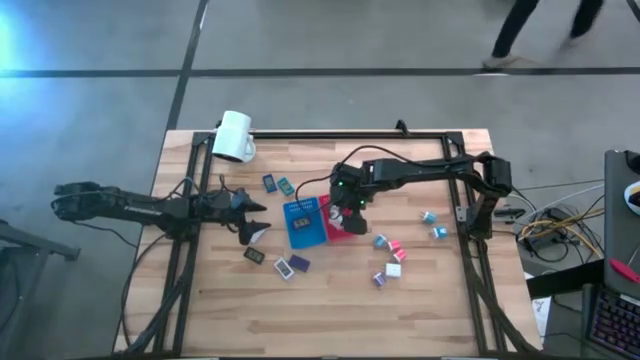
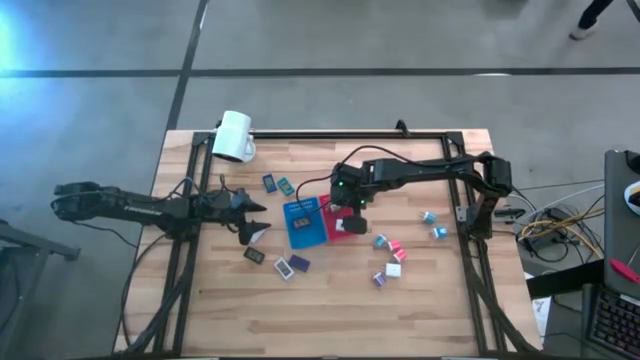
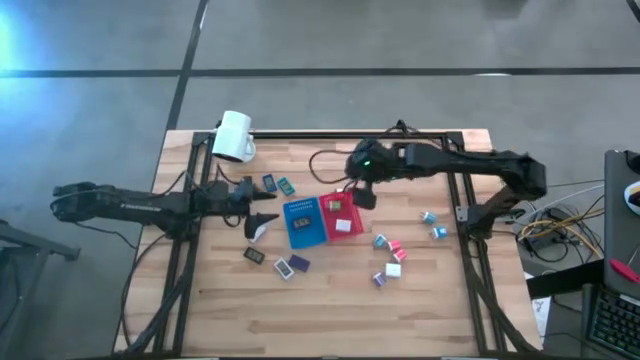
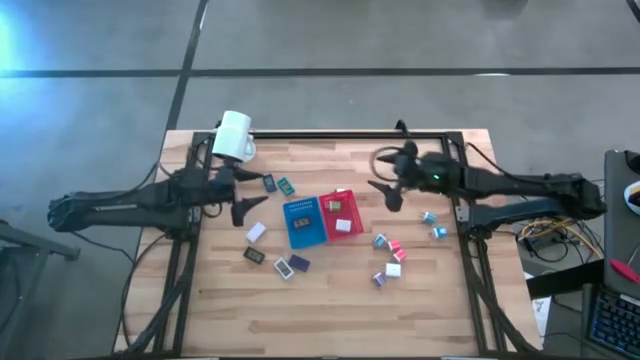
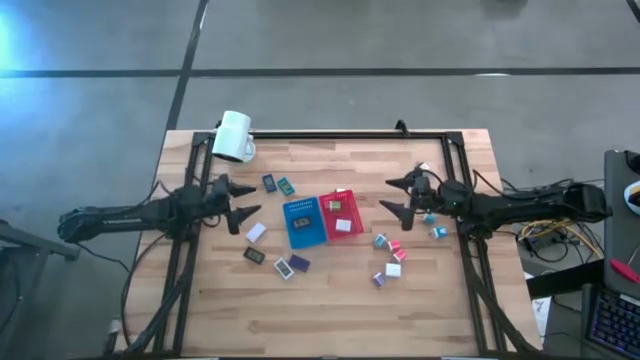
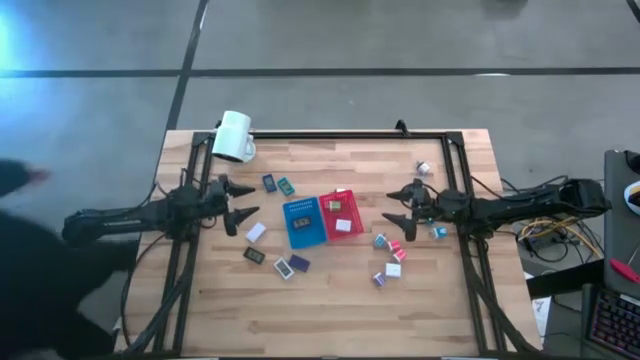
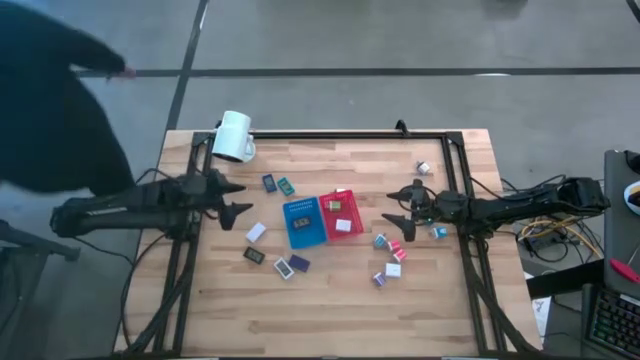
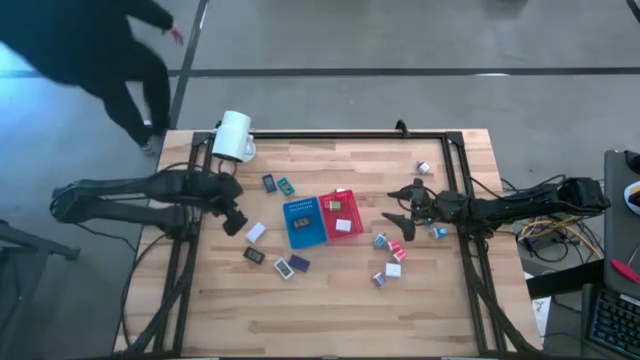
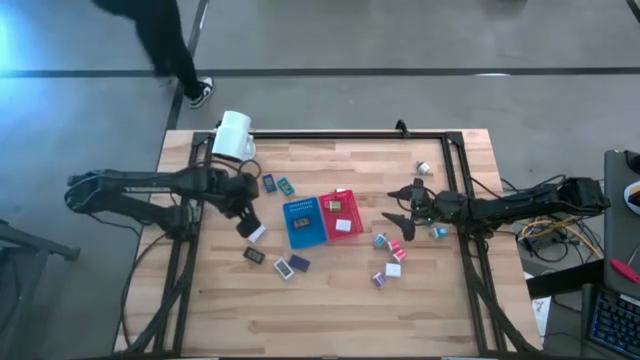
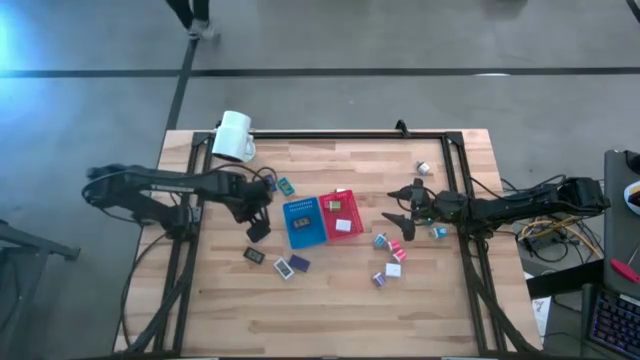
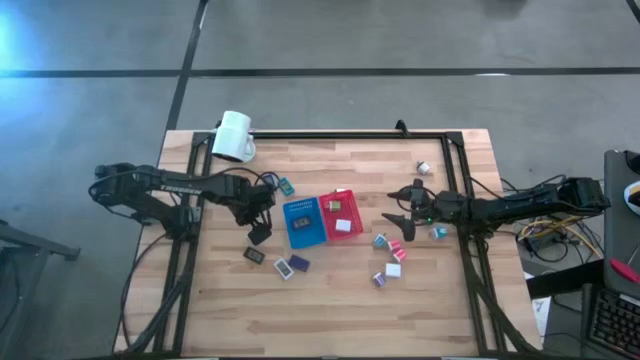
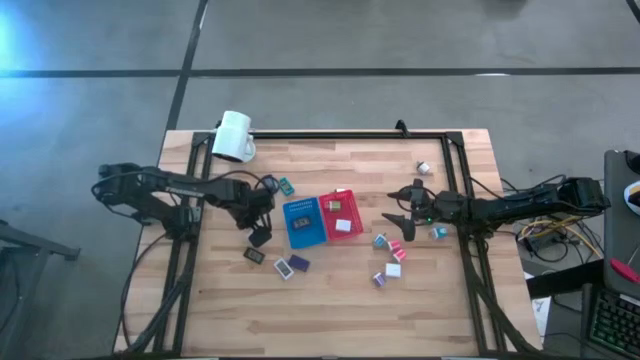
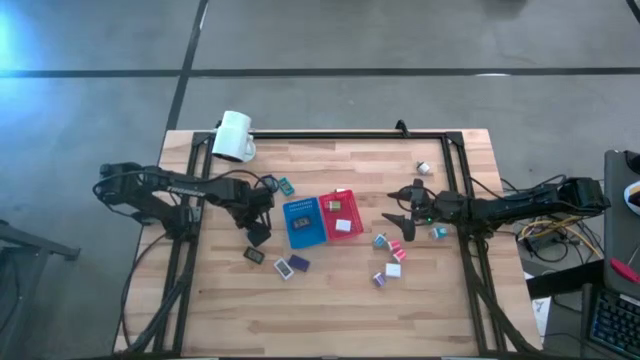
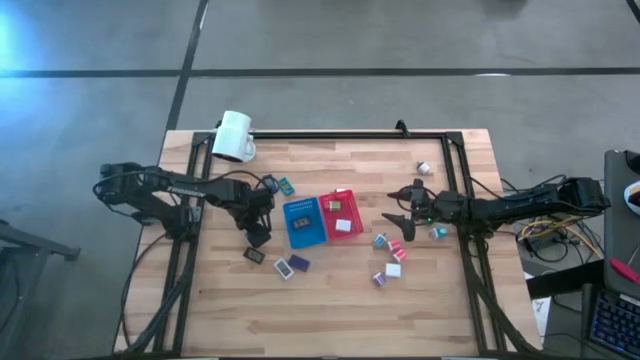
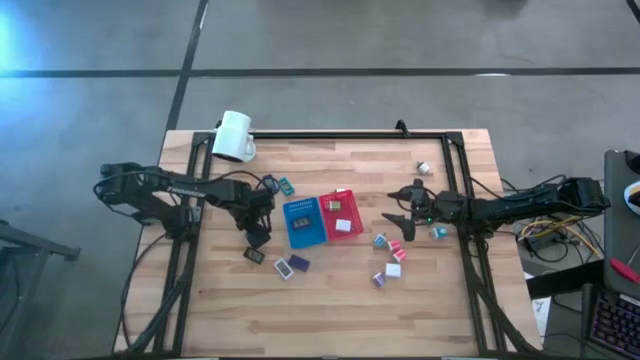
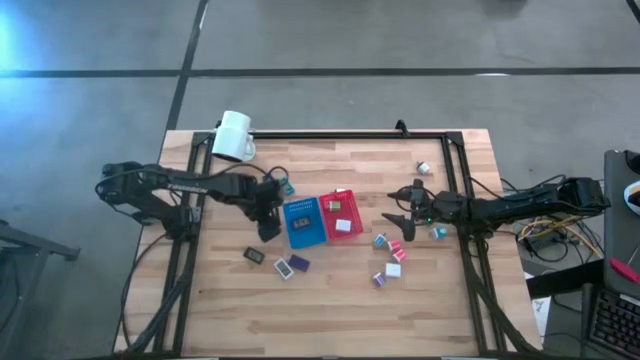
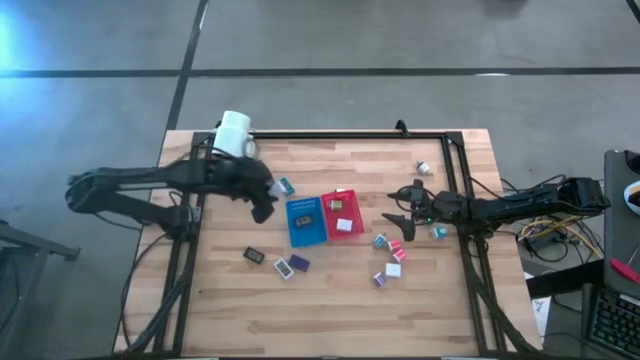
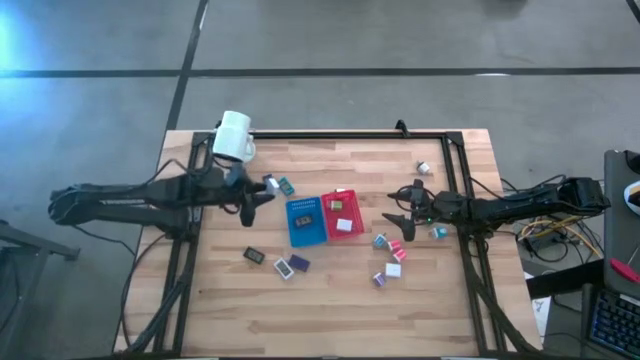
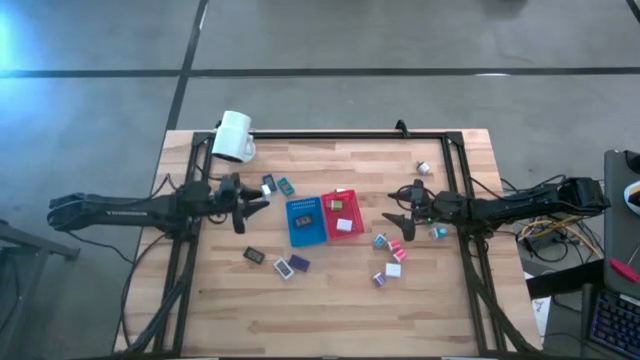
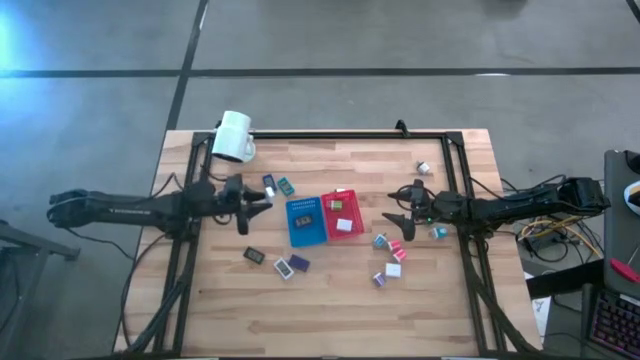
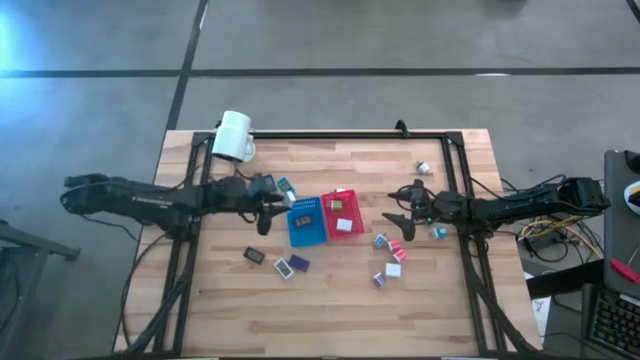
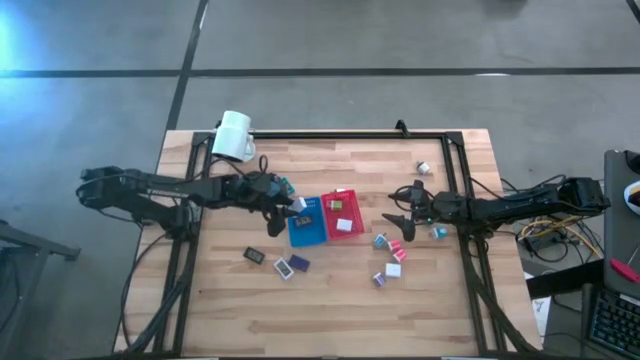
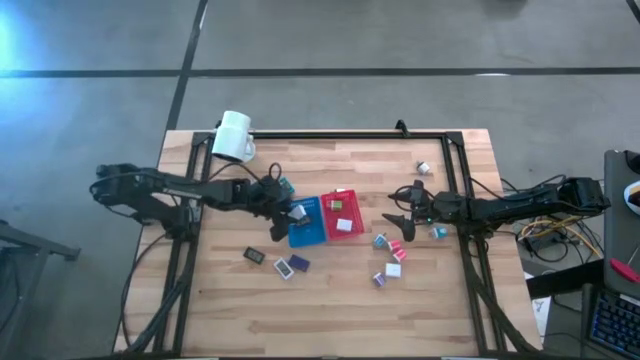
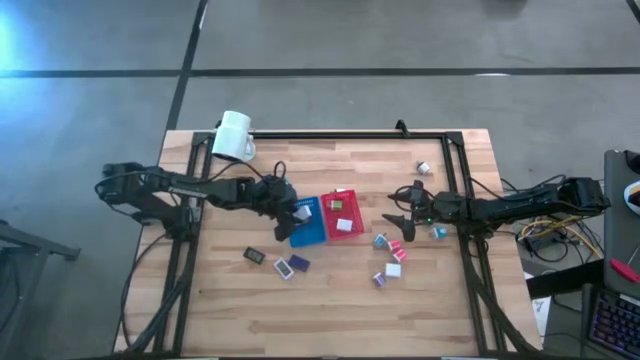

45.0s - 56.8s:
Task: Pick & Place Office items
Put the top white digital clock into the blue bin

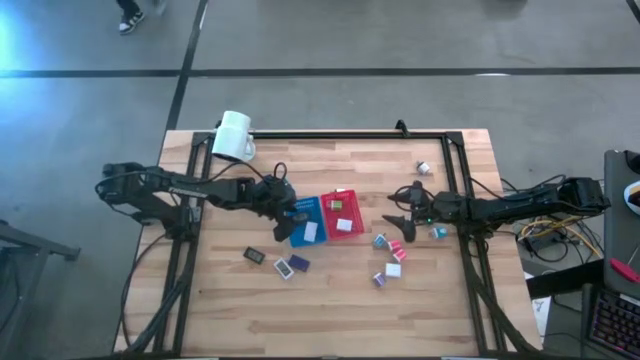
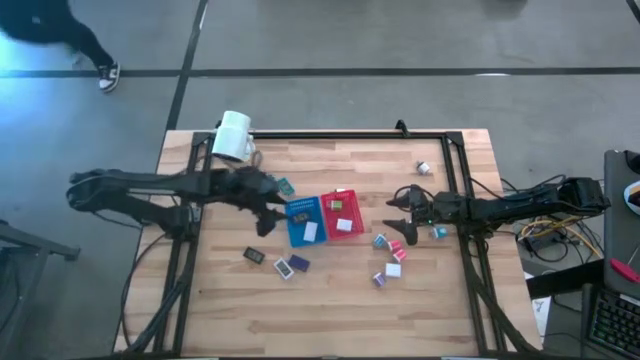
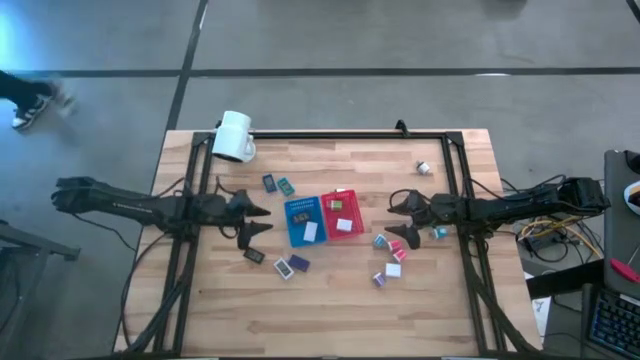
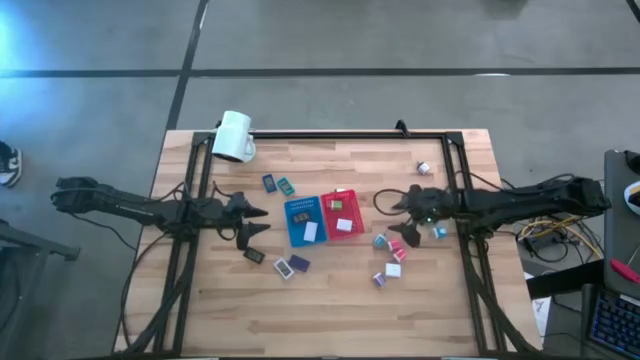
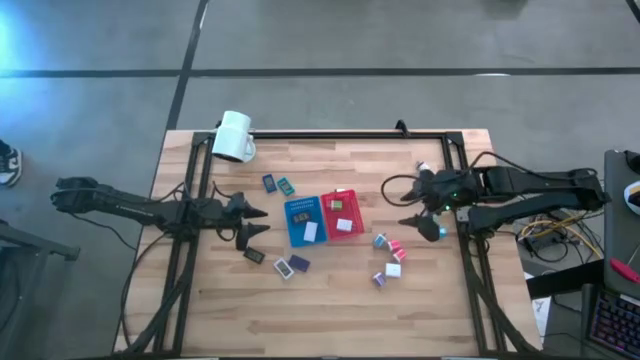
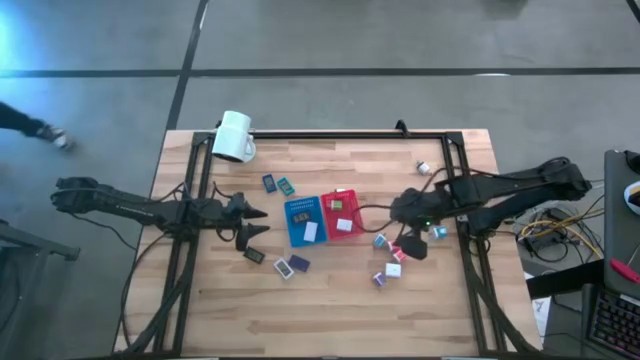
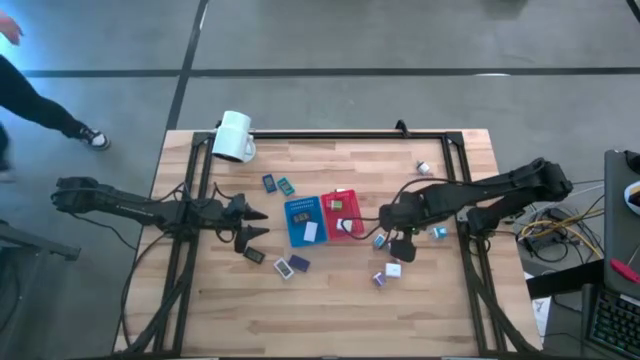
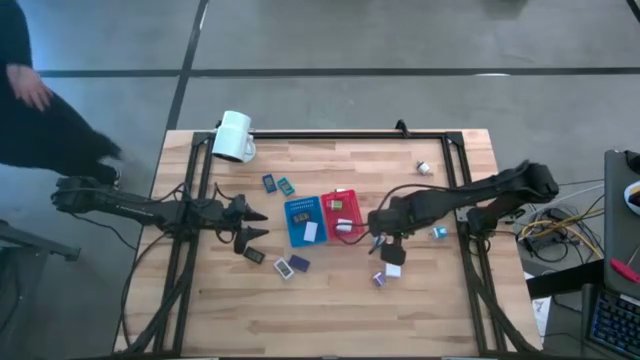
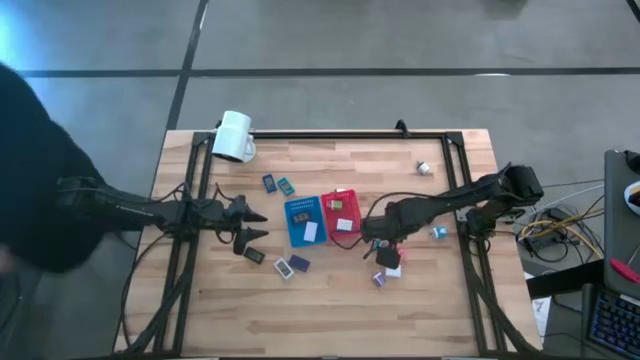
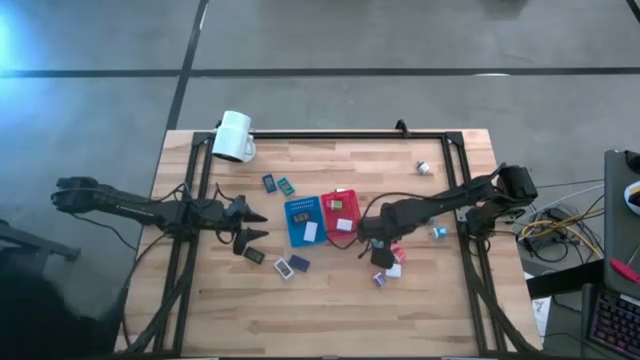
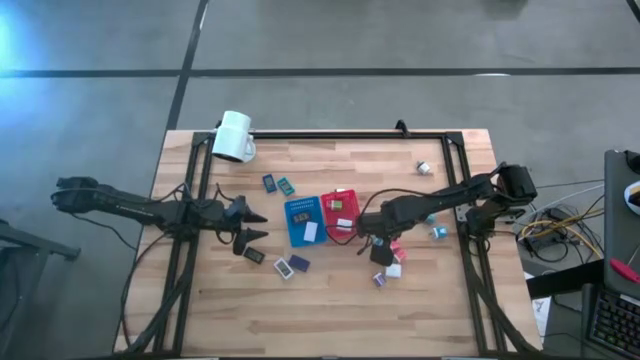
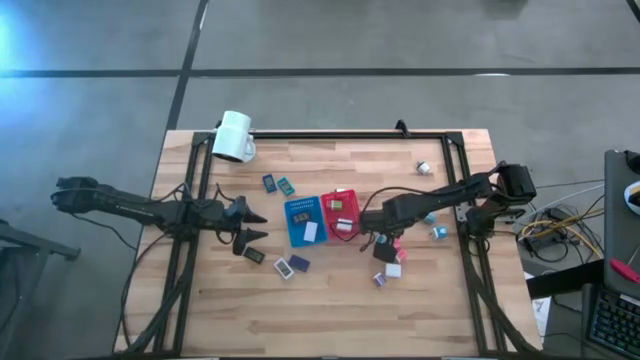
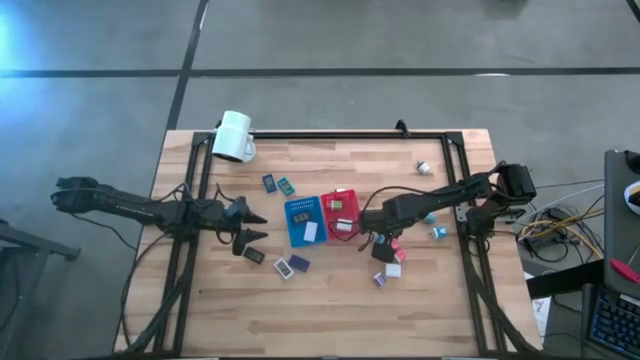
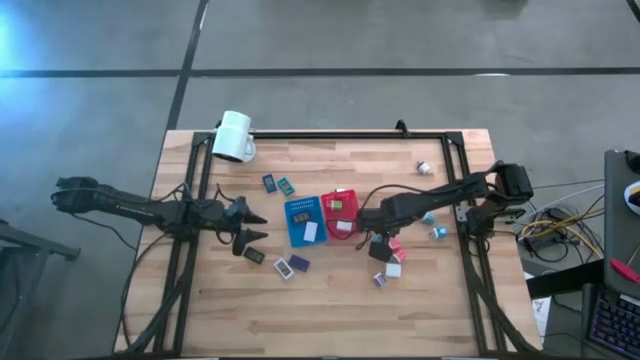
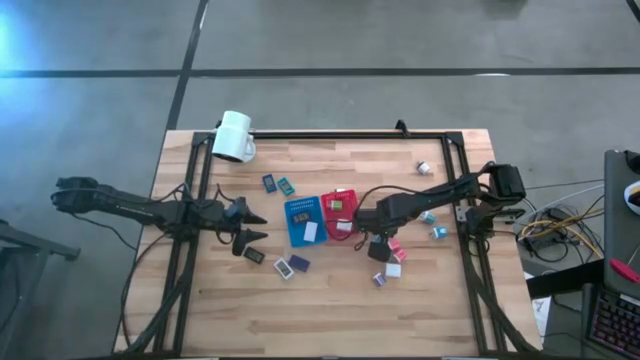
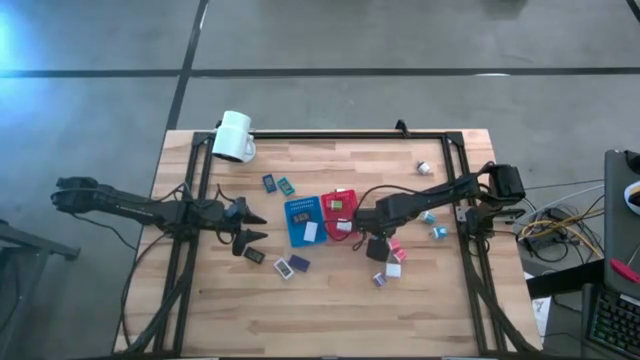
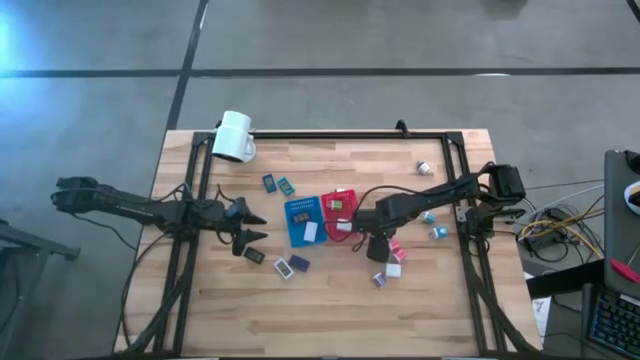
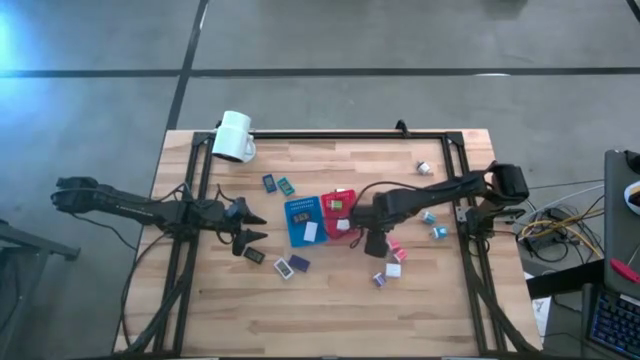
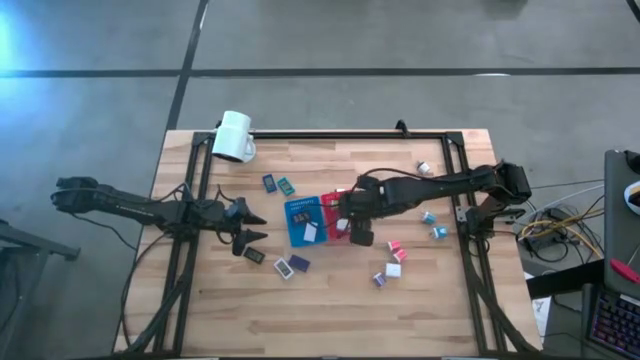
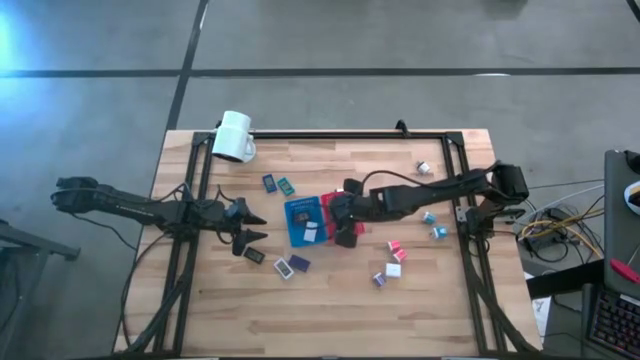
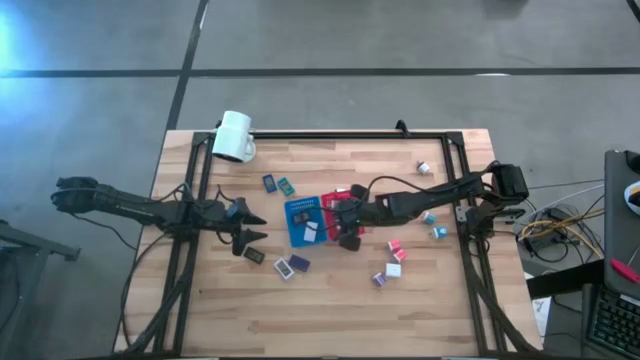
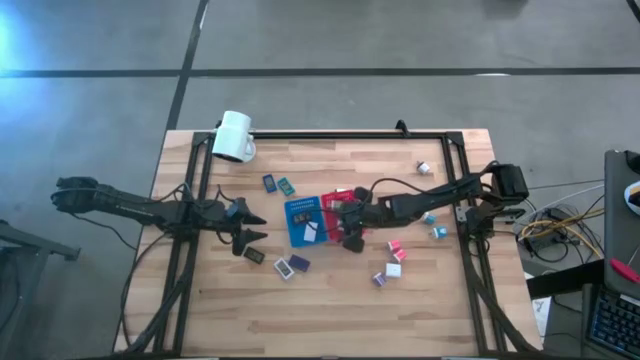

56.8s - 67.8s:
Put the bottom left blue charger adapter into the red bin
